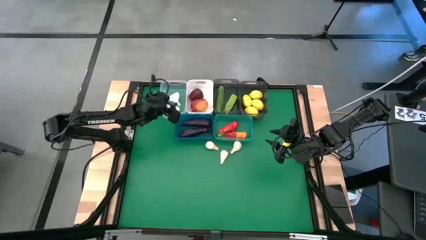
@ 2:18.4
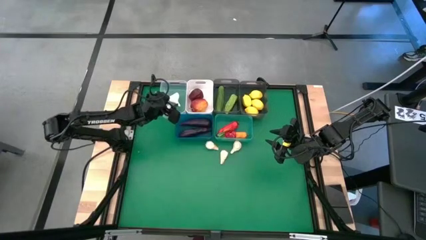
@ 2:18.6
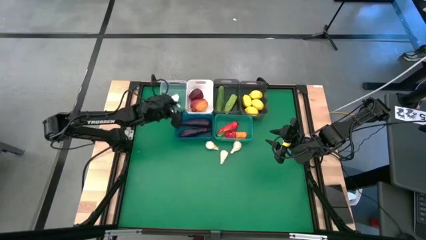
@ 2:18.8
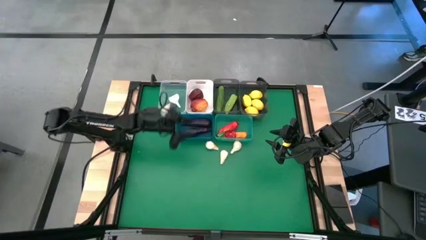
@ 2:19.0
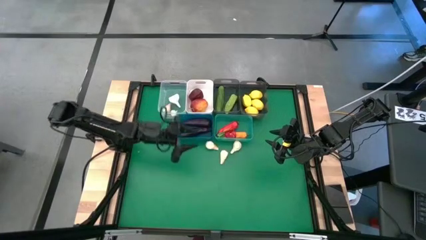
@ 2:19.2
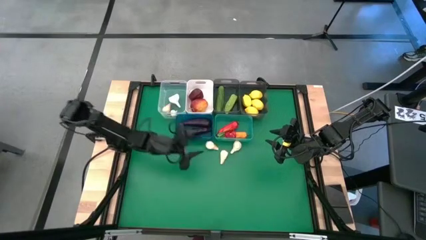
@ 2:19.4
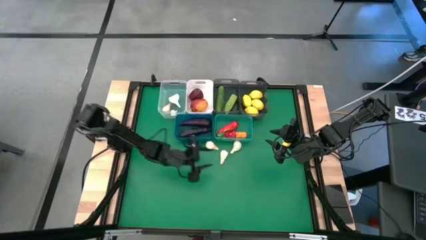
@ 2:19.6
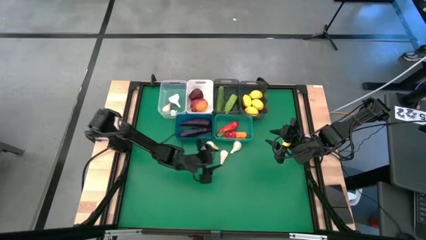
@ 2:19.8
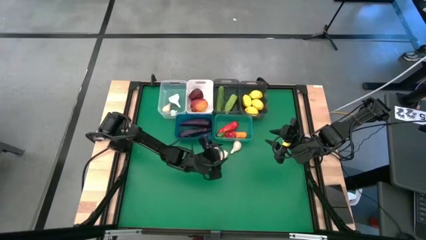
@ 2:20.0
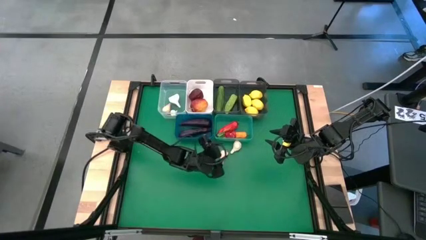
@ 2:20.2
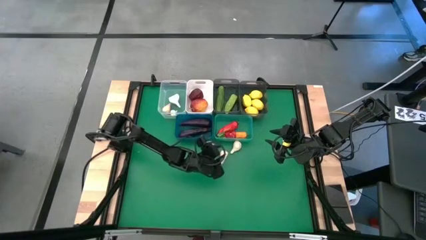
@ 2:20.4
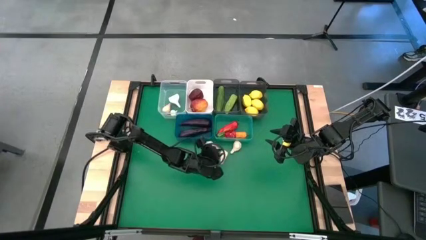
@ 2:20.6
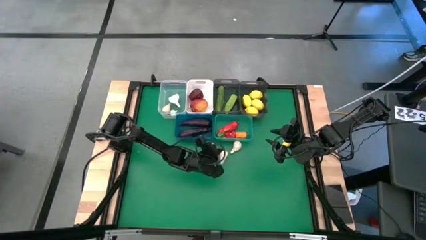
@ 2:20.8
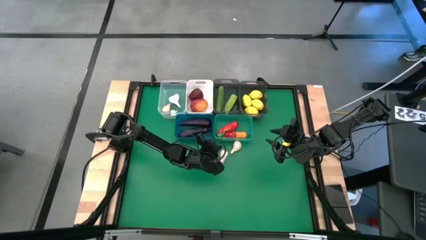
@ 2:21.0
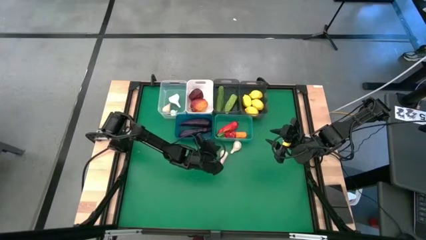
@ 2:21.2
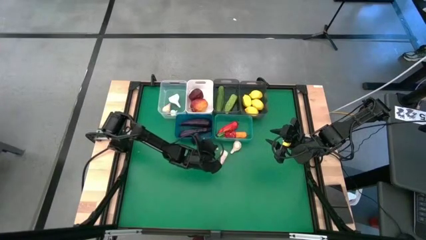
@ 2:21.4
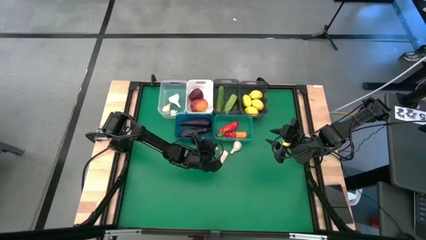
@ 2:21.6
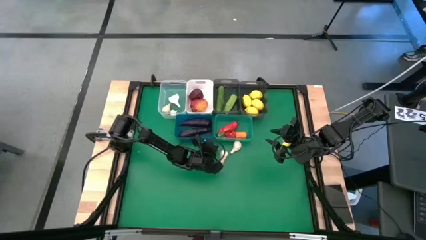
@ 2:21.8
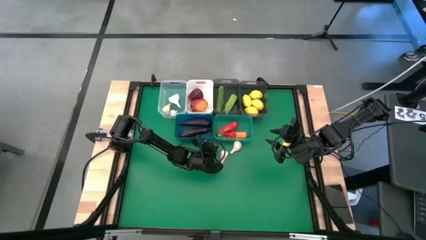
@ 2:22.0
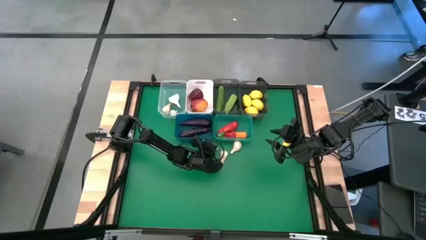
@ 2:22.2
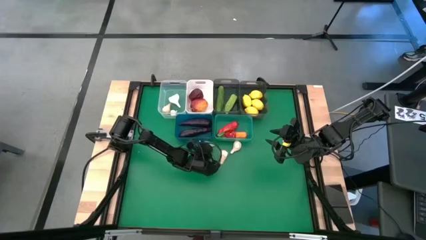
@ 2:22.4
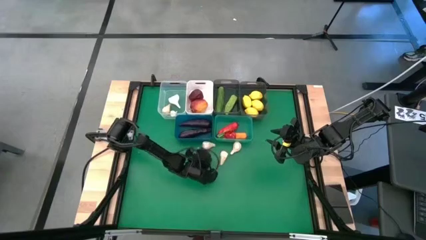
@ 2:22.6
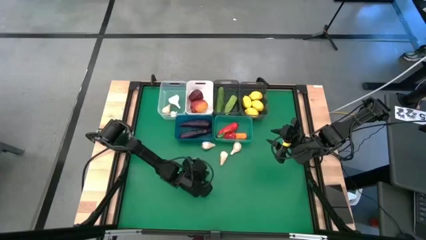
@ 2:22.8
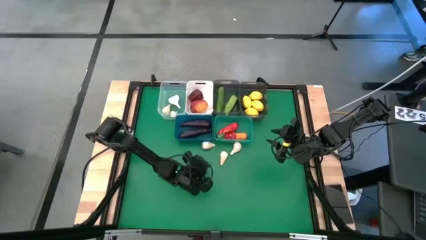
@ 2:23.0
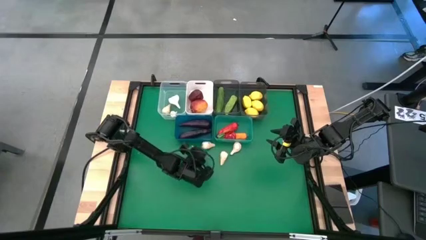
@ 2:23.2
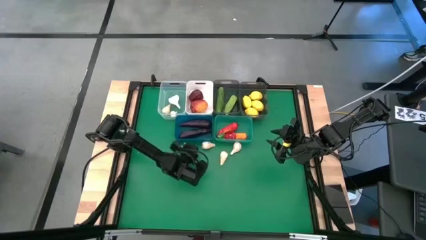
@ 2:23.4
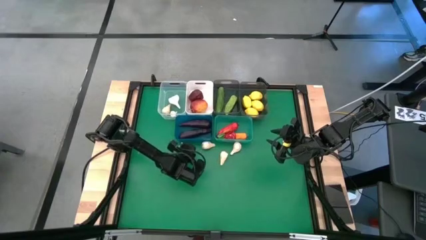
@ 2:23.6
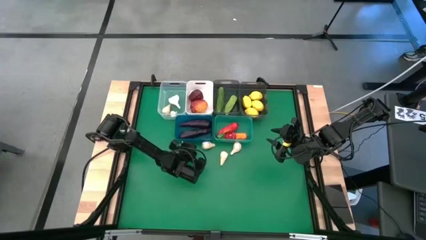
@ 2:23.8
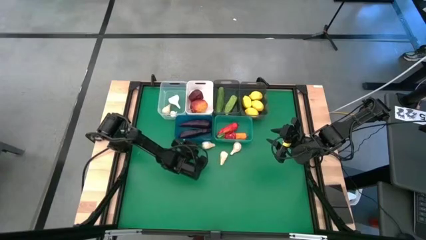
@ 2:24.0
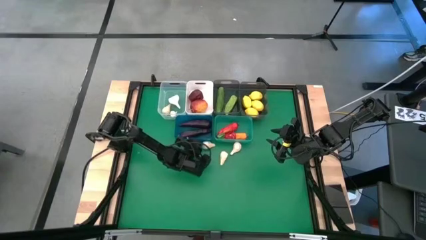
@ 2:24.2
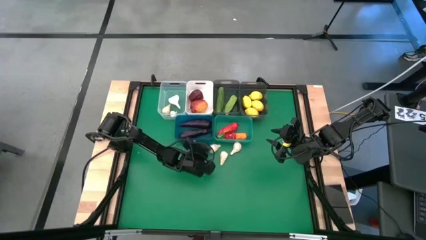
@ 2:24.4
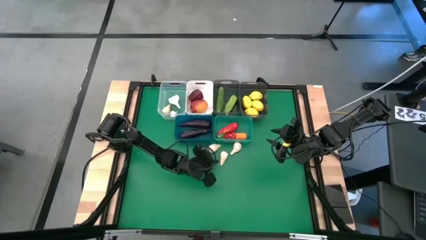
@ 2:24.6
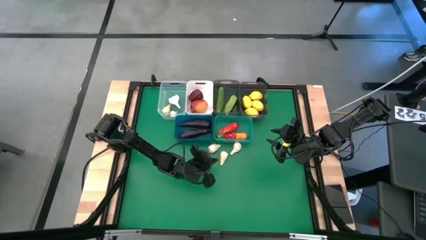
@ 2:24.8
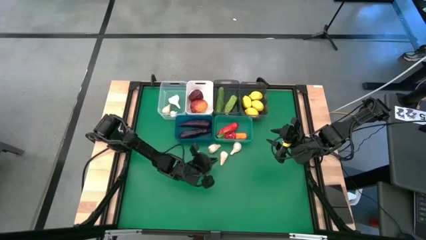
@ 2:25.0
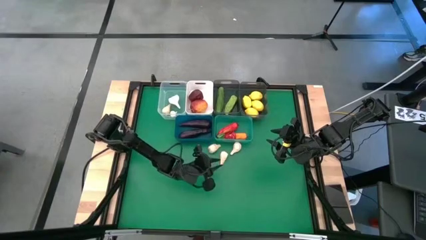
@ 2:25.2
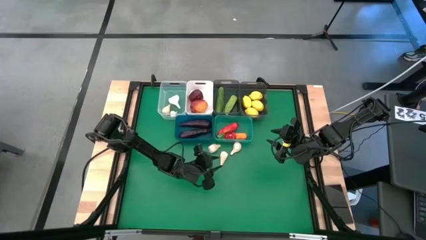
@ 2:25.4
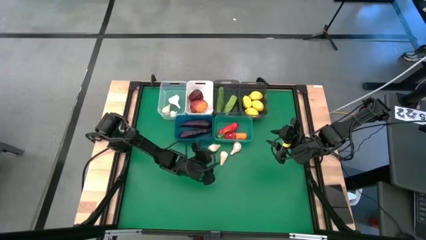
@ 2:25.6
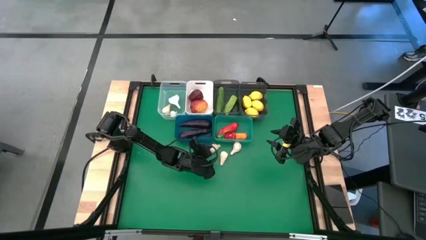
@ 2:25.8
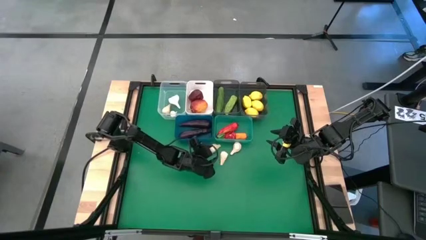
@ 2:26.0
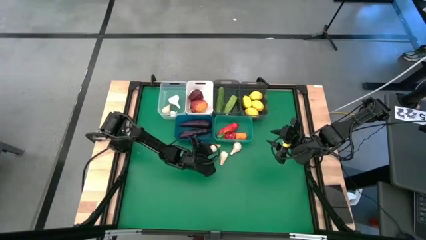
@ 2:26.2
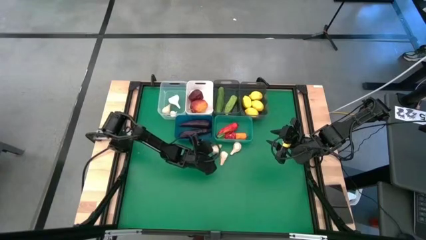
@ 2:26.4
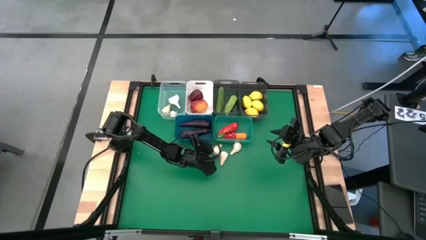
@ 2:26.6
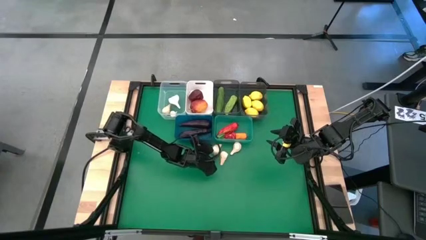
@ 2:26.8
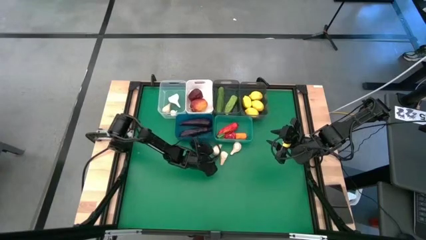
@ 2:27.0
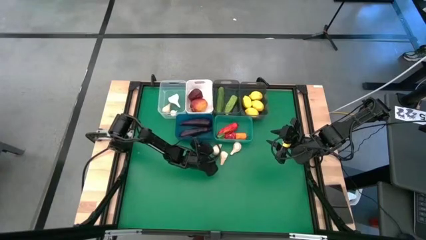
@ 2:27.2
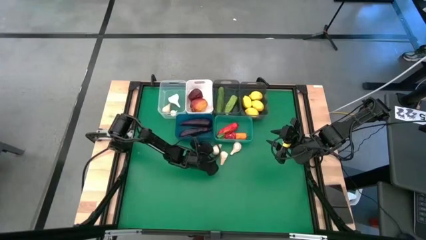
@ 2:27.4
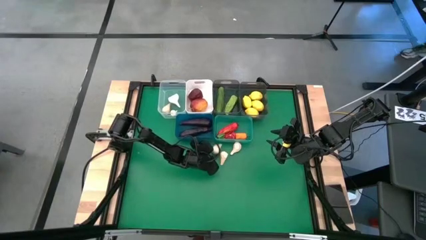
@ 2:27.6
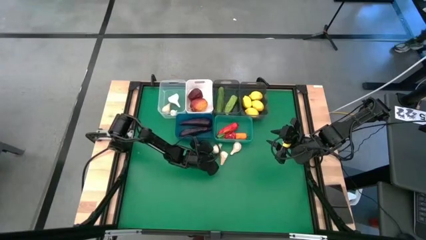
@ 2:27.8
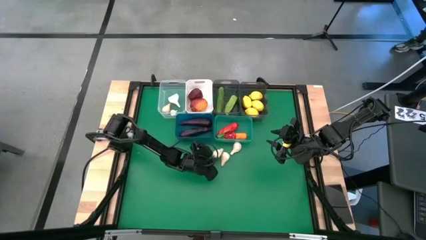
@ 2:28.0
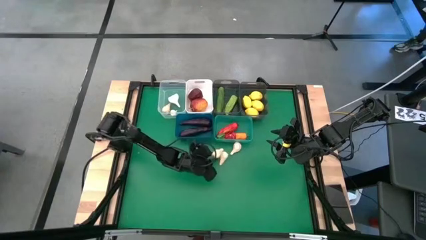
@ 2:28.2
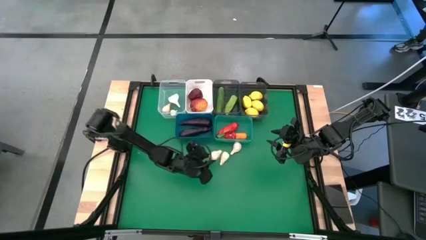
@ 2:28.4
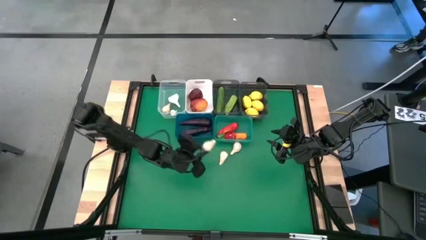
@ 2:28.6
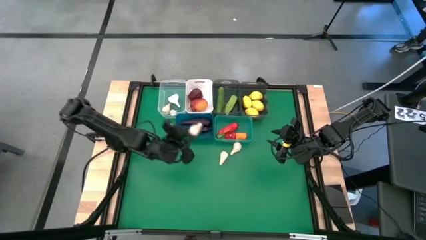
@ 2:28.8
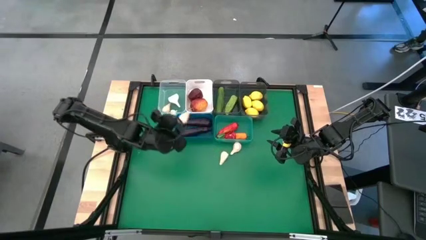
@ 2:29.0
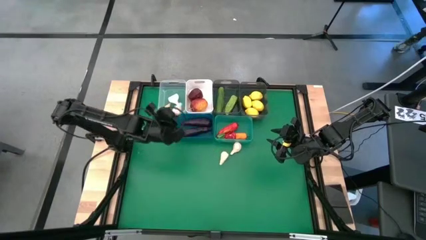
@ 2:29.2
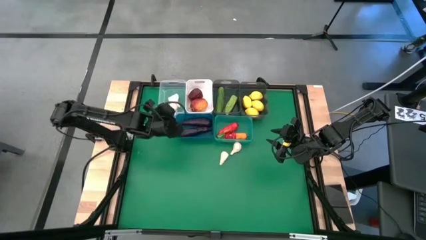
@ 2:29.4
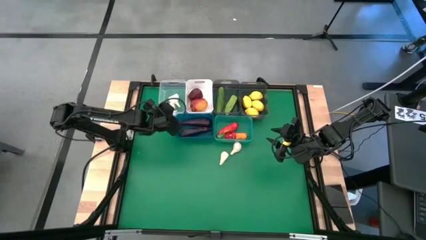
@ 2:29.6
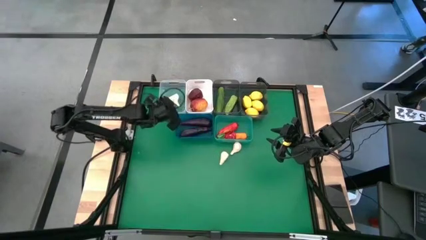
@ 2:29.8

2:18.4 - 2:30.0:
Task: Sort produce into baskets
Put the garlic into the transparent bin

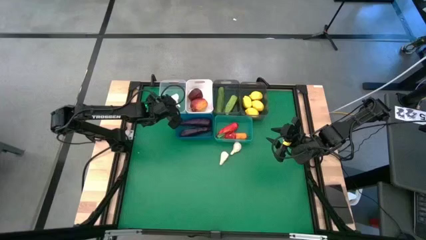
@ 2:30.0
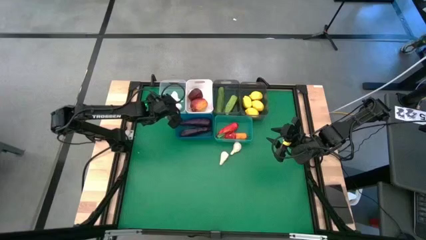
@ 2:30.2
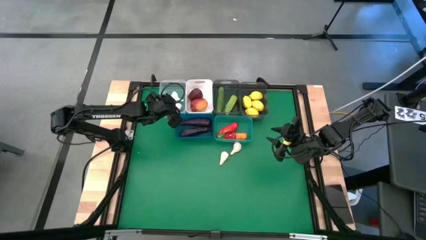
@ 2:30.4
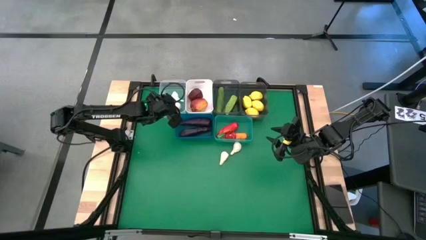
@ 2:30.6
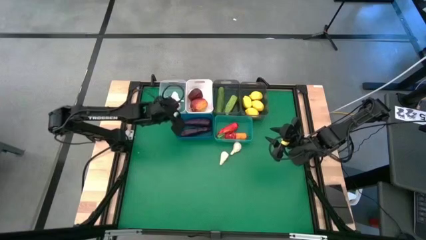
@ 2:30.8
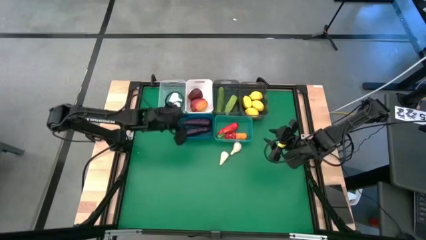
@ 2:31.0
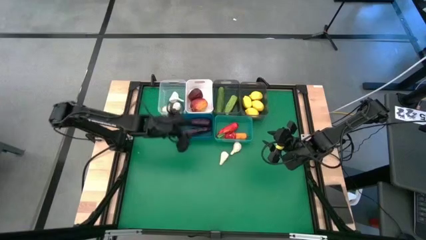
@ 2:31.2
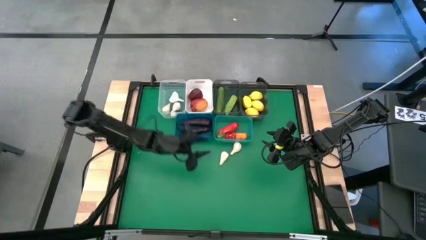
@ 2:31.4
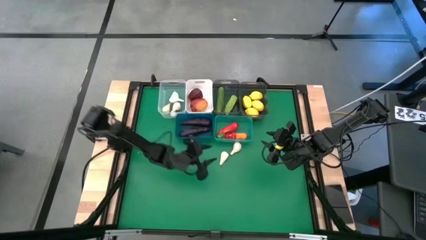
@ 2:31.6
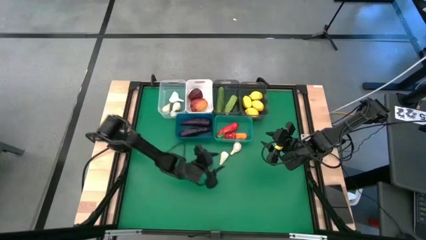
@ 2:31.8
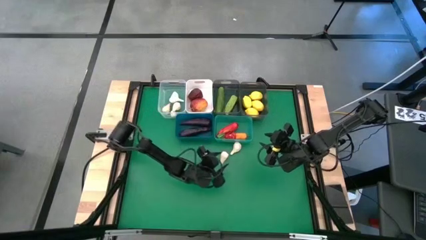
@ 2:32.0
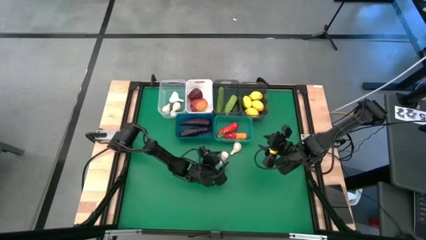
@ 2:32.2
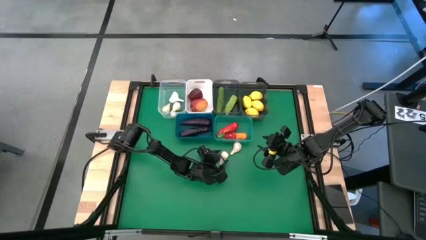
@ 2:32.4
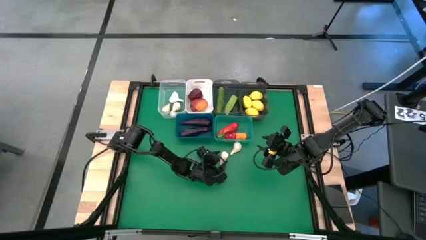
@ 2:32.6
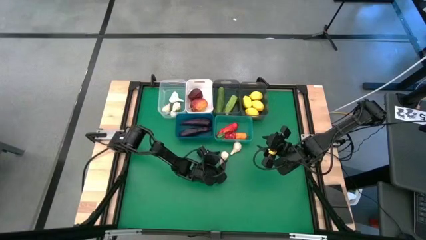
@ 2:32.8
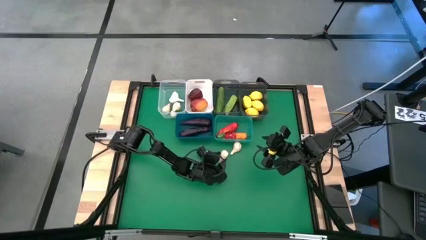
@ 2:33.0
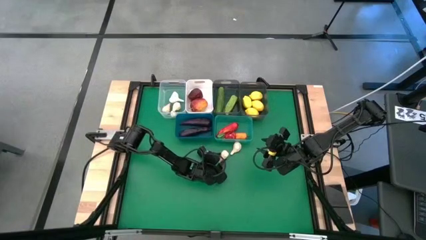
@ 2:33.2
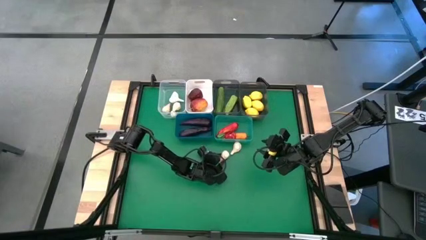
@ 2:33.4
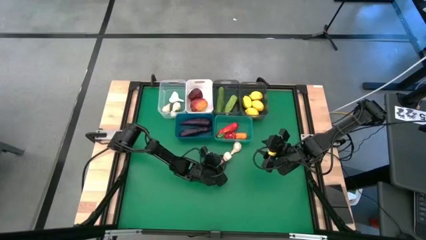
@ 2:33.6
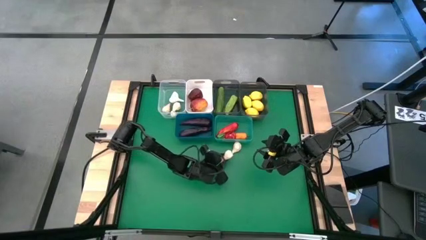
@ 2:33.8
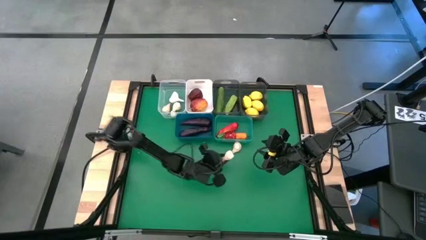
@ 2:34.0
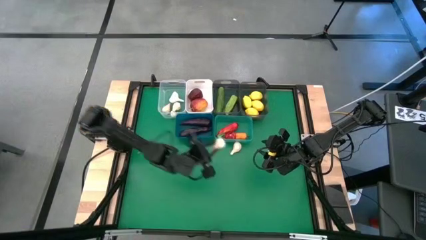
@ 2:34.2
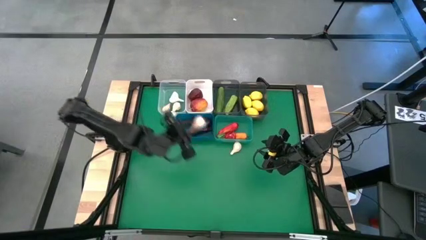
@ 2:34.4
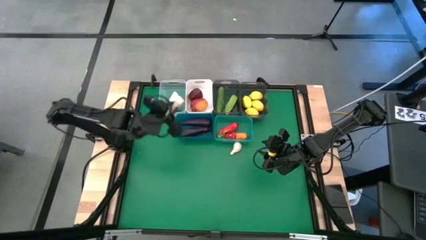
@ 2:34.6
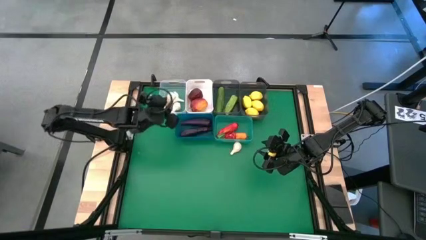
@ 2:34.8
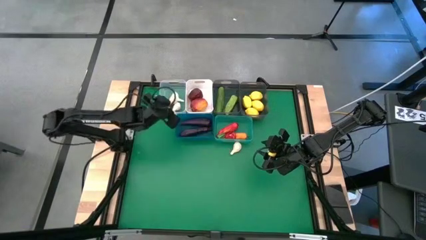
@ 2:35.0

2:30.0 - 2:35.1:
Put the garlic into the transparent bin
